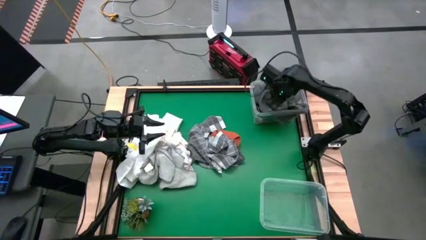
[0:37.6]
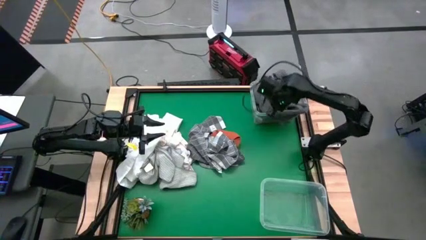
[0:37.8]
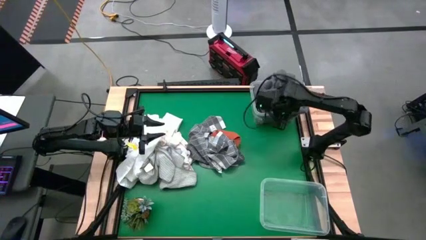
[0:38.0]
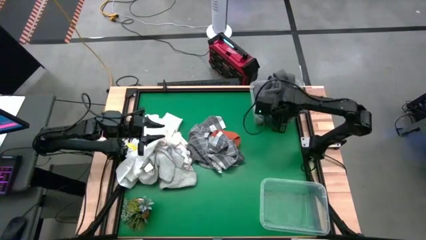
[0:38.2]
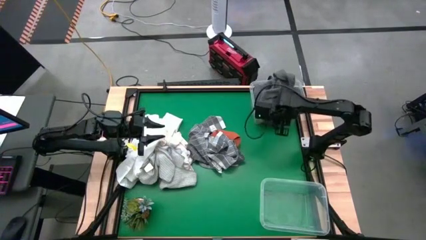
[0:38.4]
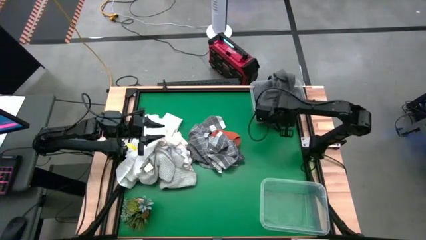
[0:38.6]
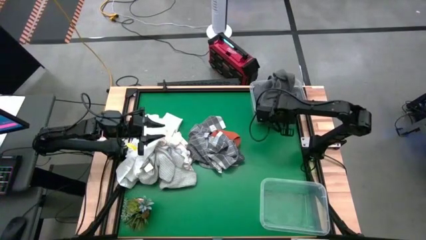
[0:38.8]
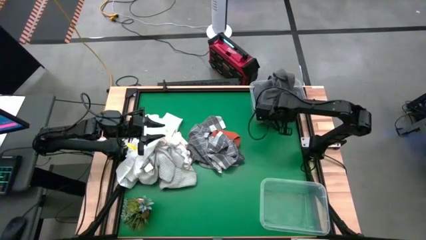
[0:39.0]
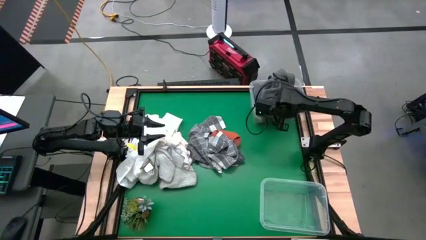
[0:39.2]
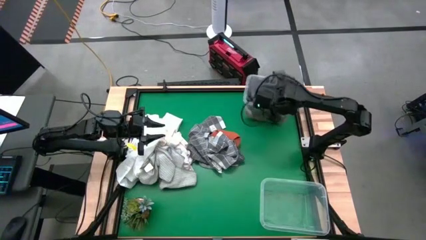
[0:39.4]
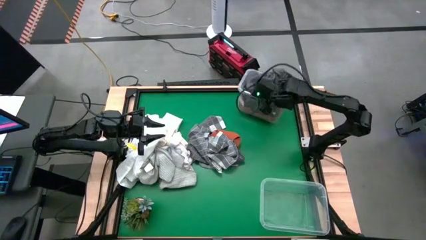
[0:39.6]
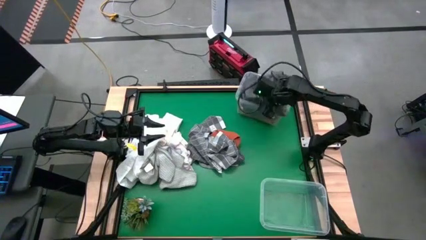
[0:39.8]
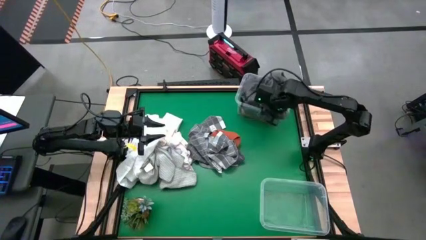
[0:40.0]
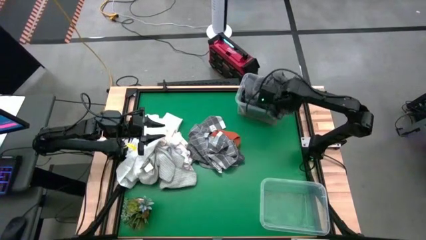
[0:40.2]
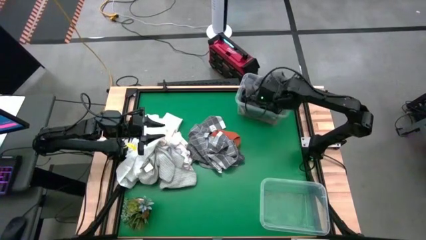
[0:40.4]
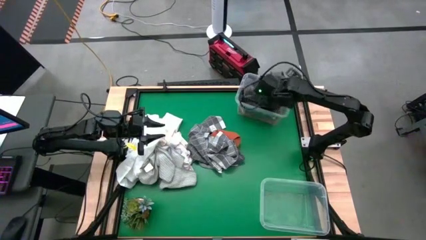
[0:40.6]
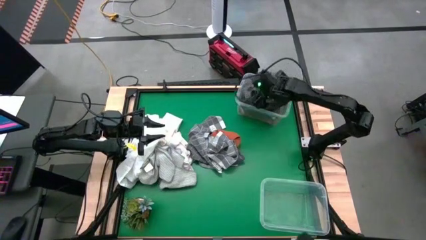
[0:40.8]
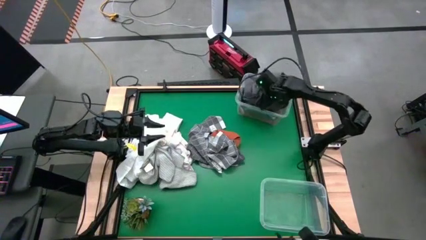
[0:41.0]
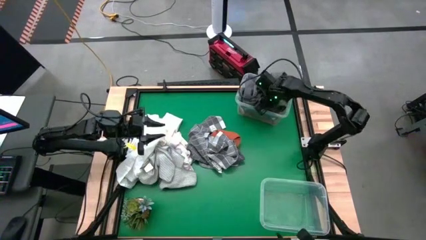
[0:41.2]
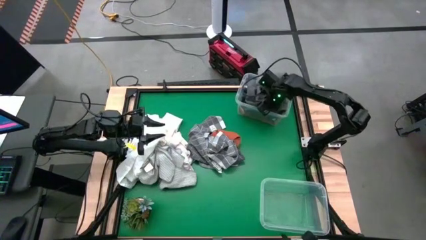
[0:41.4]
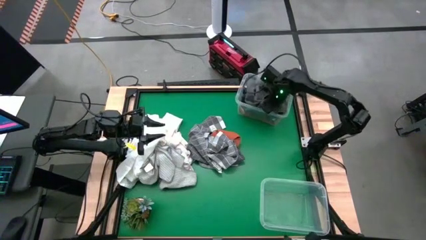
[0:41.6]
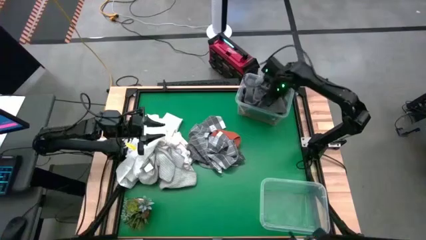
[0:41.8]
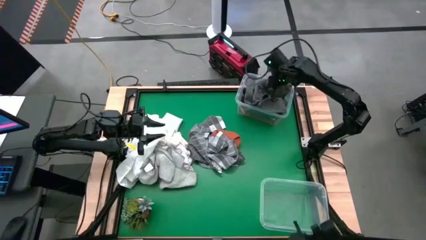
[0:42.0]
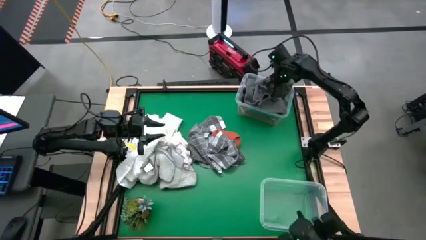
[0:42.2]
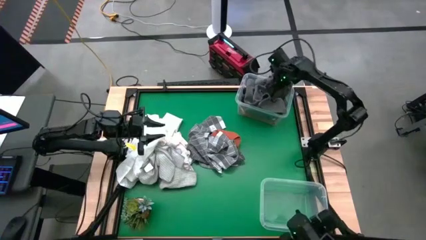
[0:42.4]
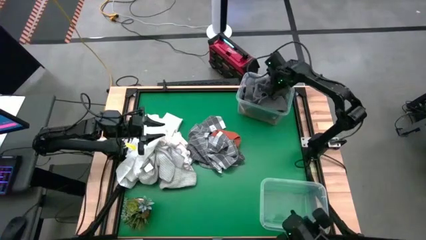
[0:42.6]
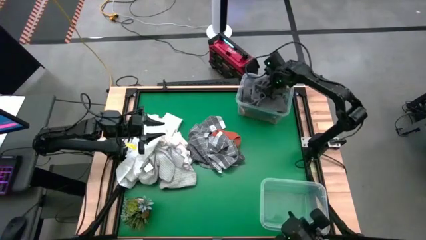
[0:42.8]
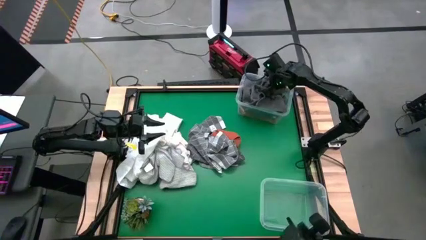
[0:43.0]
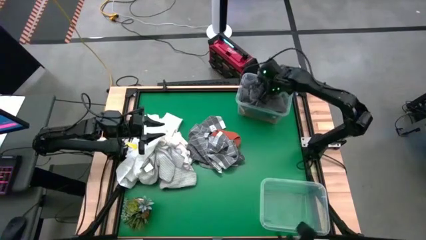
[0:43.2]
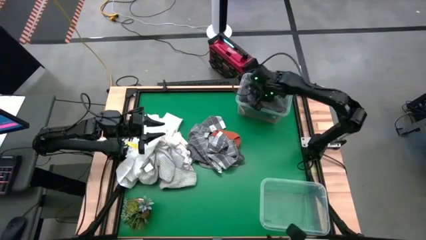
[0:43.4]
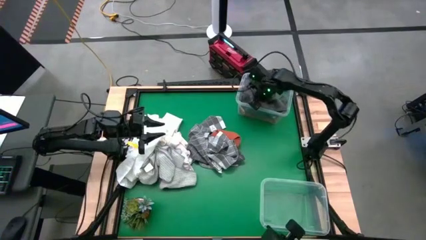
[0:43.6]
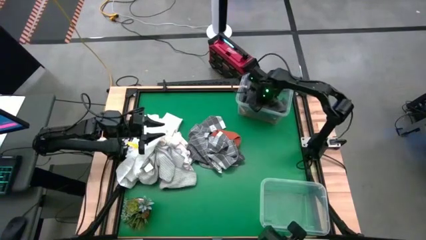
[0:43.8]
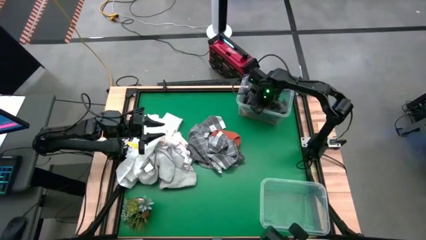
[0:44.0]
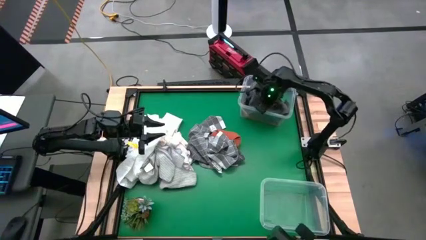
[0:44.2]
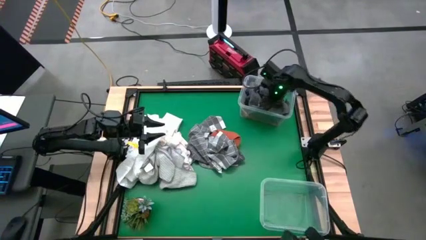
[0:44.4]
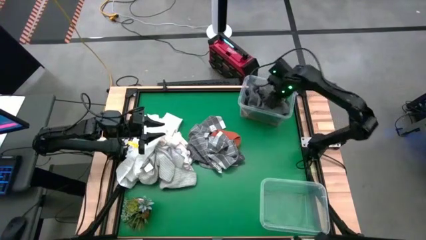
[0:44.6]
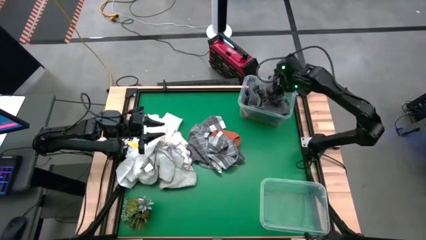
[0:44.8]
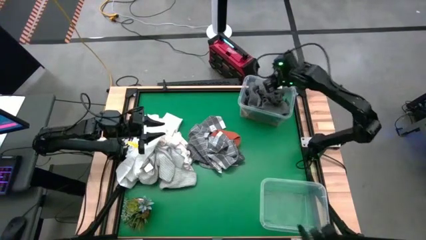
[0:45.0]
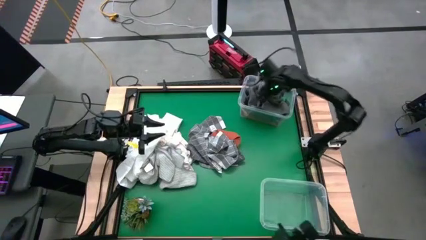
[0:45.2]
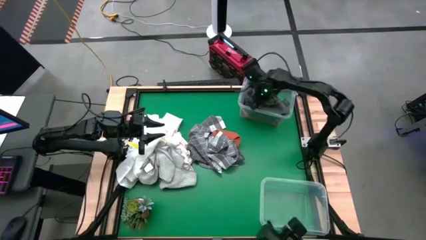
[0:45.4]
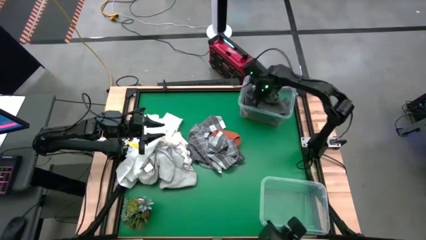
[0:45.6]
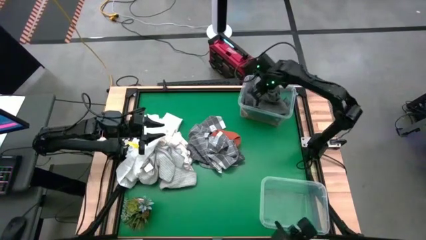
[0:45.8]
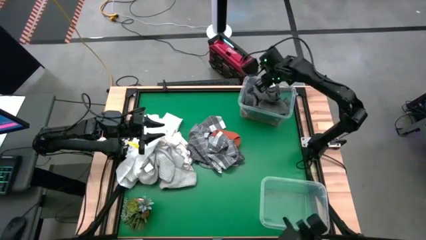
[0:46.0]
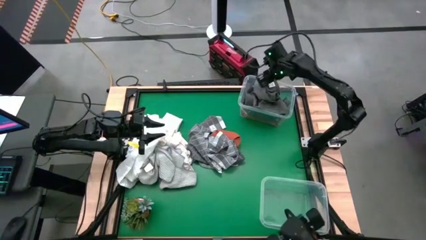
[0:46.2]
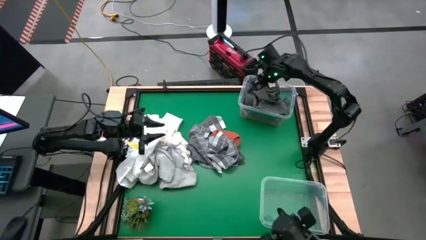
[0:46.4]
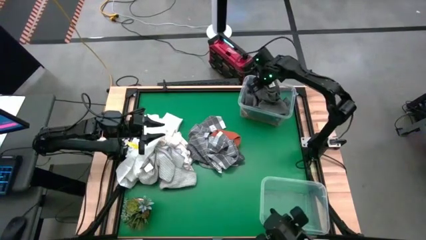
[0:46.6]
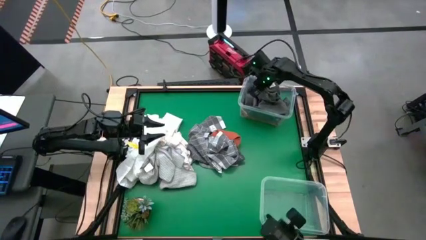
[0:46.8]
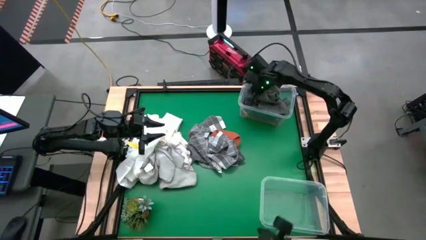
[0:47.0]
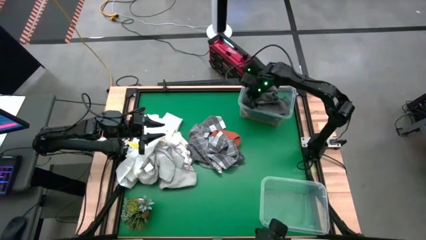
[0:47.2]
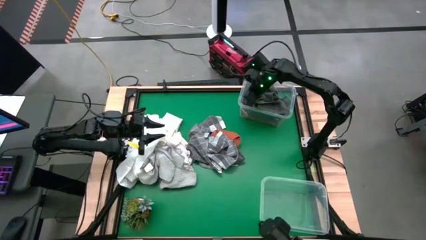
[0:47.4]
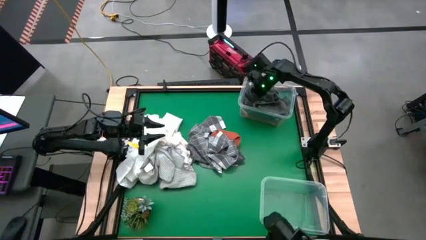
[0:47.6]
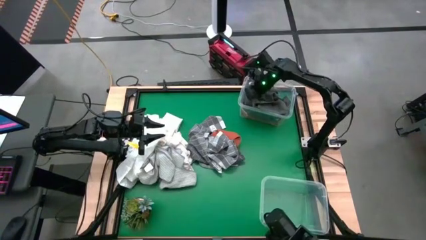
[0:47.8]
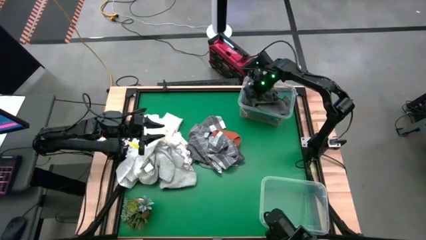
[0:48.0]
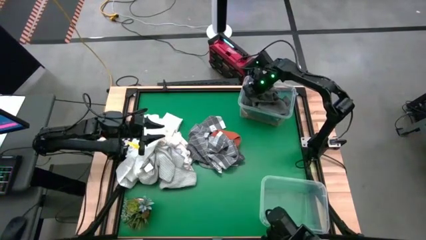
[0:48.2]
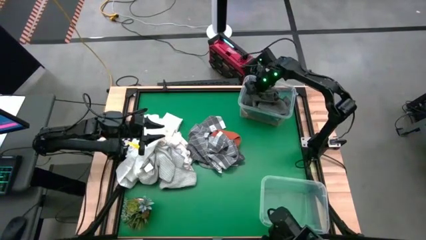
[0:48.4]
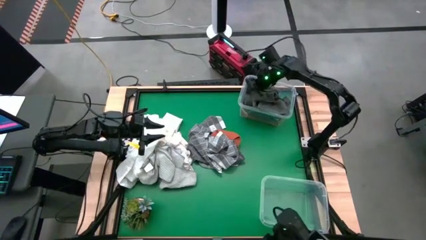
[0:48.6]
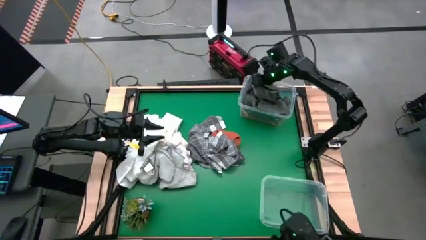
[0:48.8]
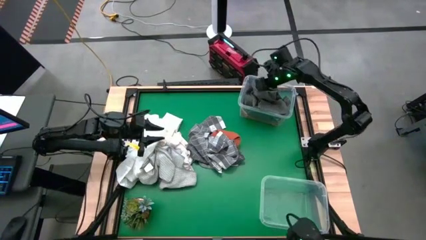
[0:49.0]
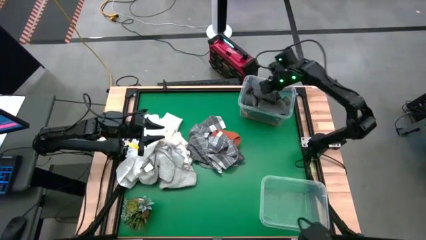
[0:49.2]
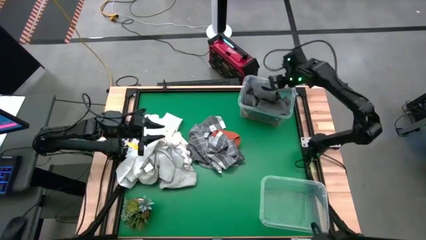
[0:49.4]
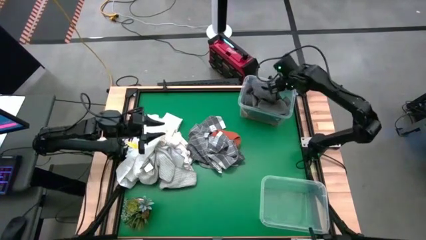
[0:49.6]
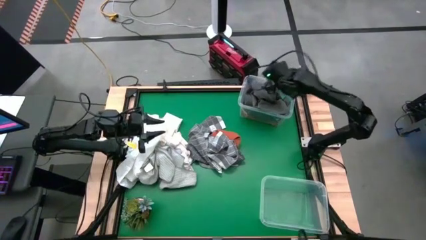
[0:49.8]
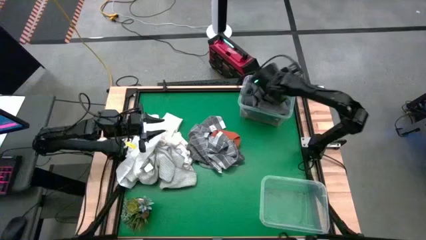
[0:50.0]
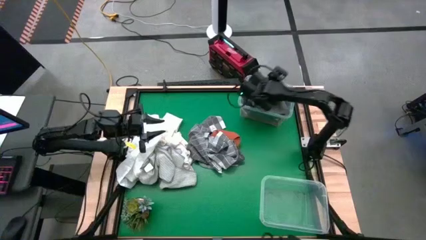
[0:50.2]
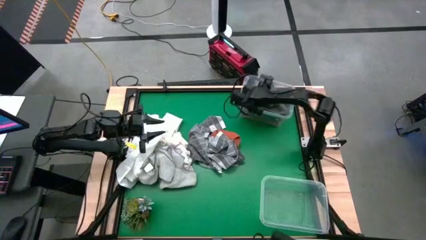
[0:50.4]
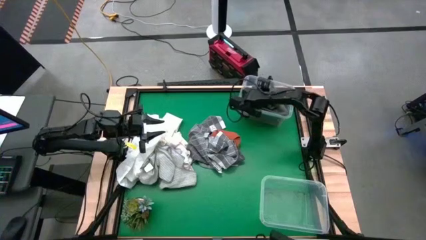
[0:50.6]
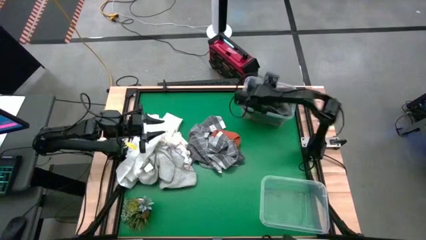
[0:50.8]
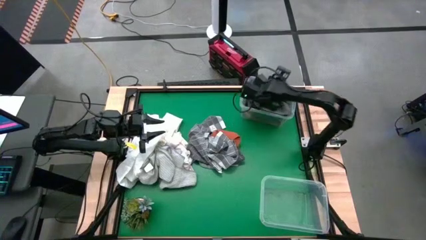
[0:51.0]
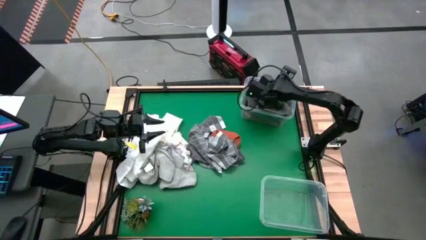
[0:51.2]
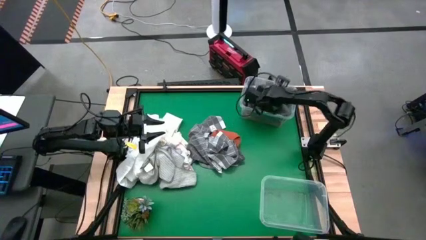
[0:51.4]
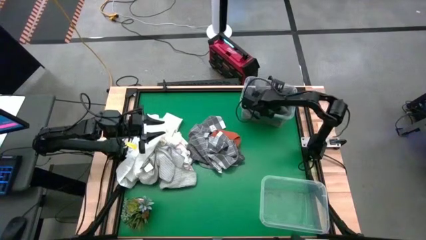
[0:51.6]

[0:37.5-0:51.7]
Task: Sort towels by color in basket
Put the gray towel into the top transparent bin
